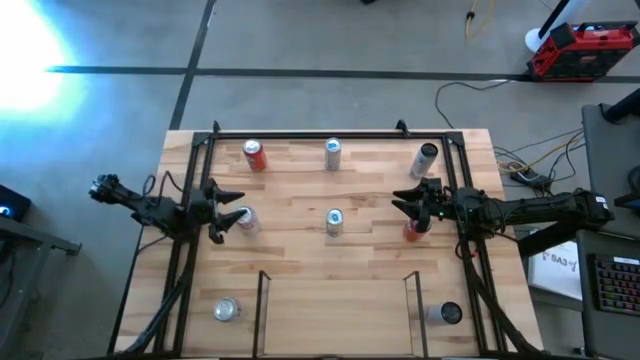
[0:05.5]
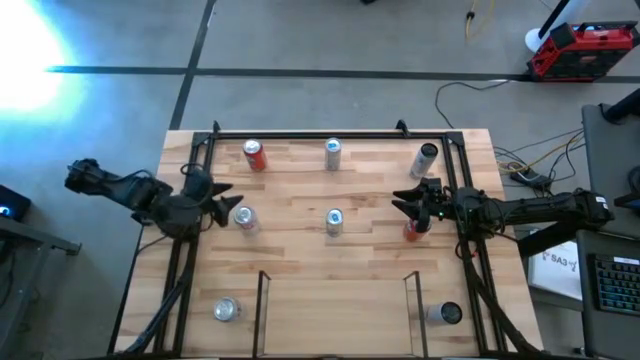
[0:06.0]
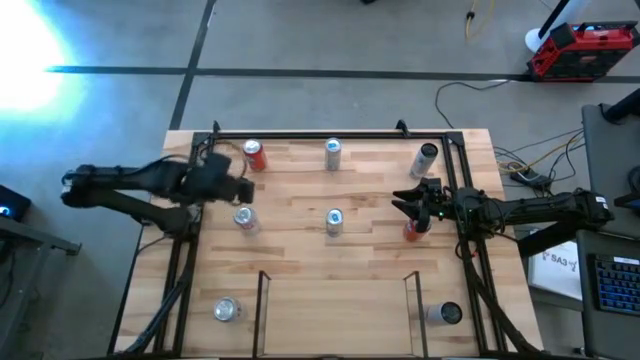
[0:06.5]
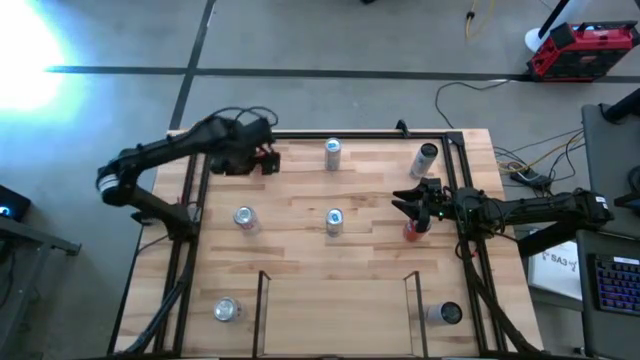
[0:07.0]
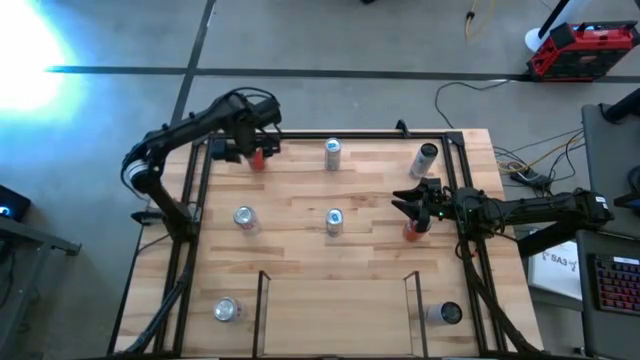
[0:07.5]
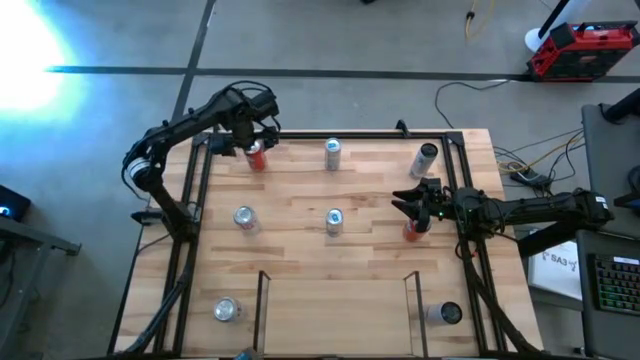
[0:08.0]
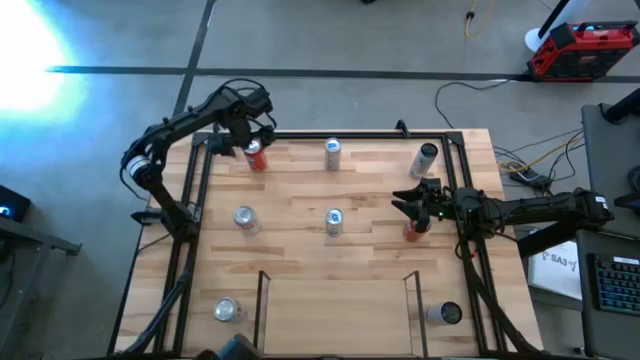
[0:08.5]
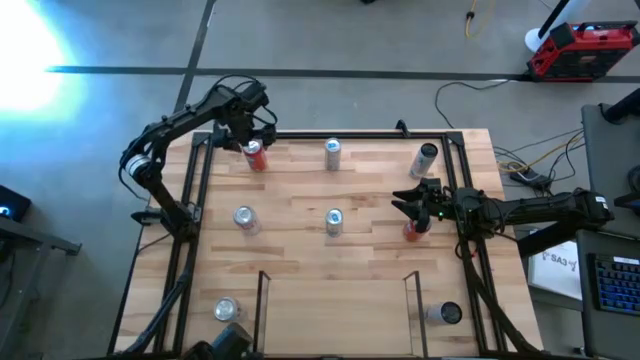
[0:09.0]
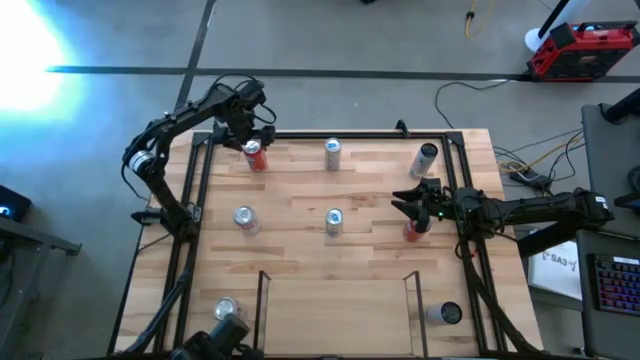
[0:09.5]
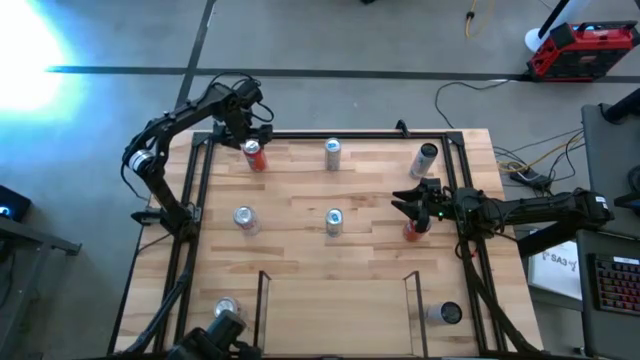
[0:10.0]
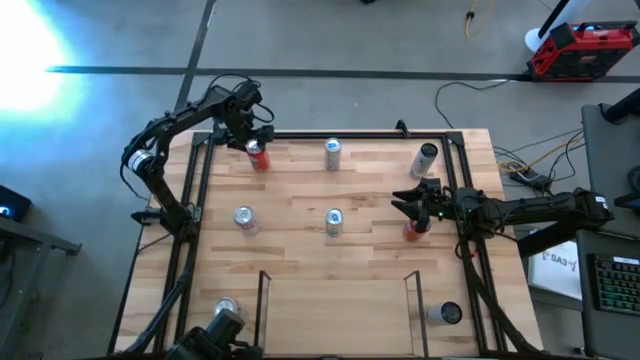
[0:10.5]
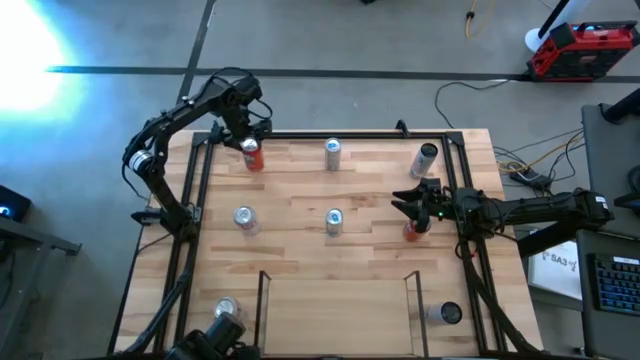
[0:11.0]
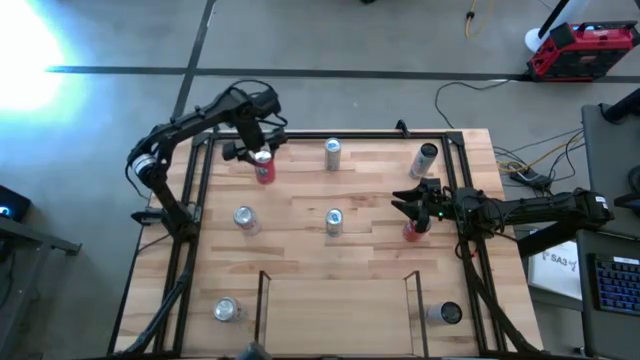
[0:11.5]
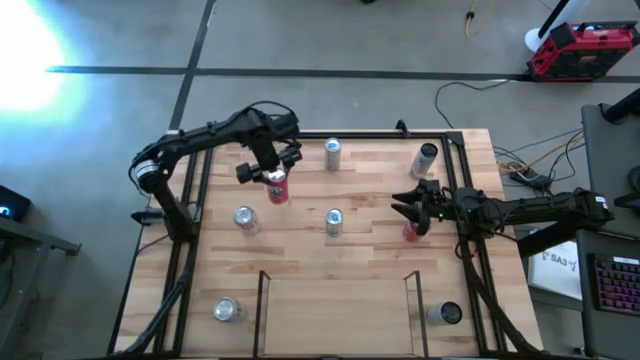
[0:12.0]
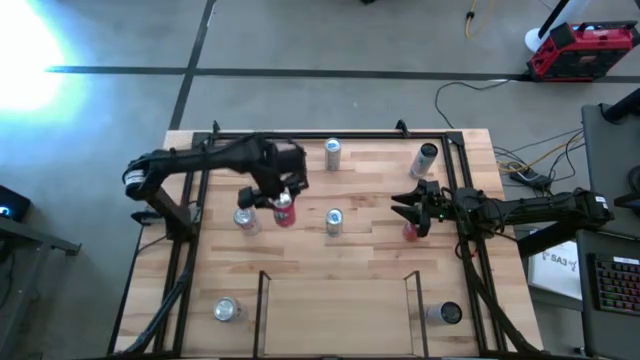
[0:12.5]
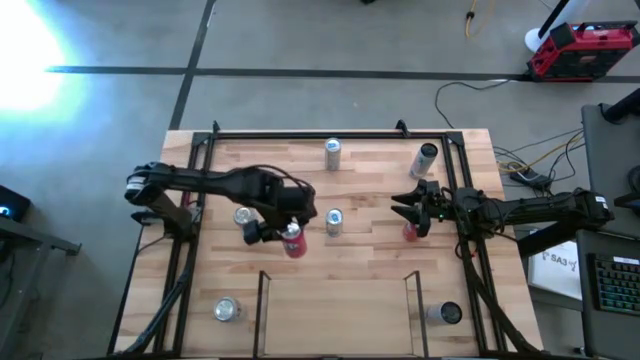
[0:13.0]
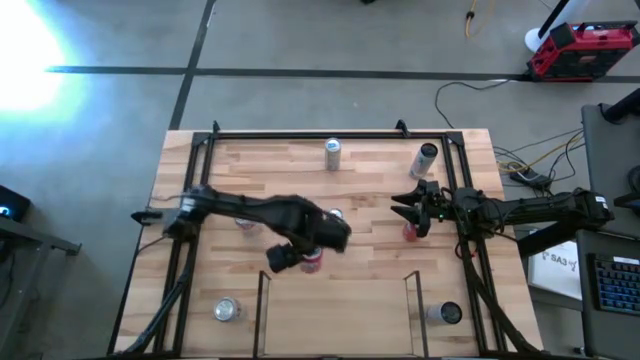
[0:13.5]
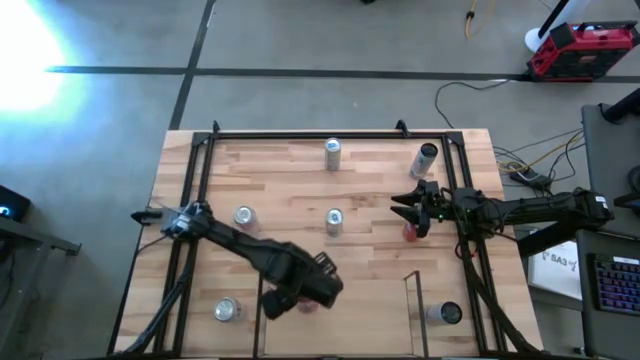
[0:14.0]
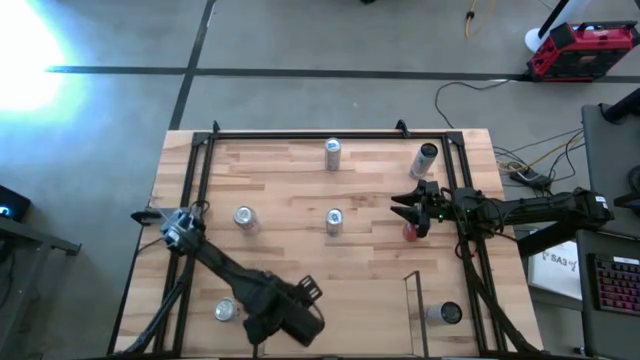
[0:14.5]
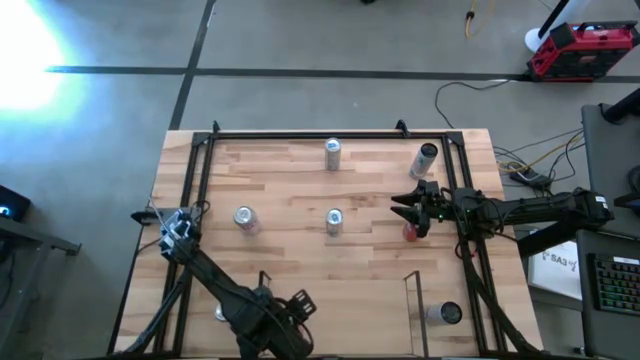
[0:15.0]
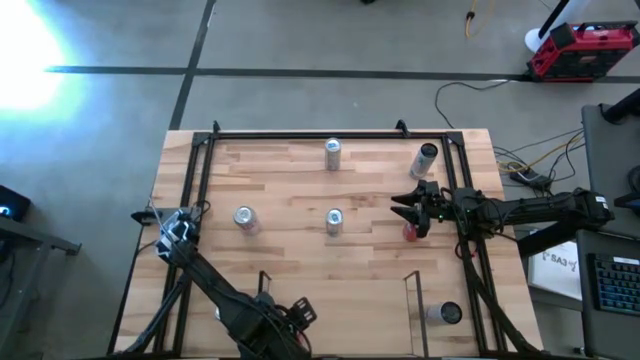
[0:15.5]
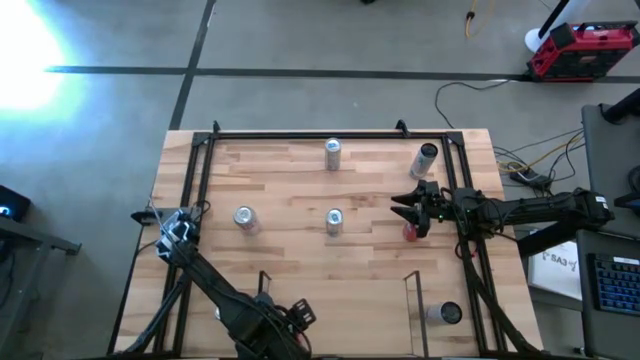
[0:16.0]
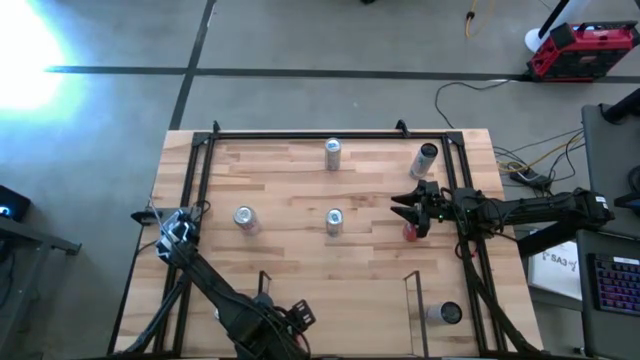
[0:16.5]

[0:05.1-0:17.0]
Task: Place canned beverage on shelf
Put the left red soda can on the shelf

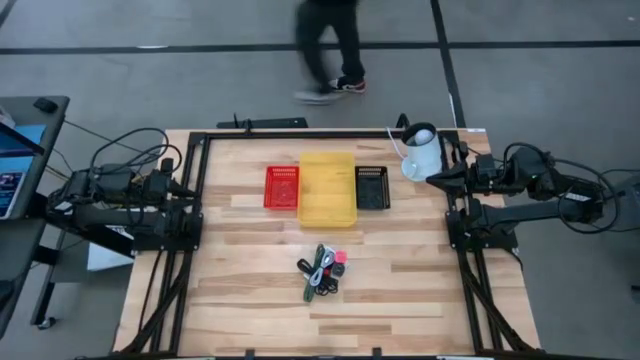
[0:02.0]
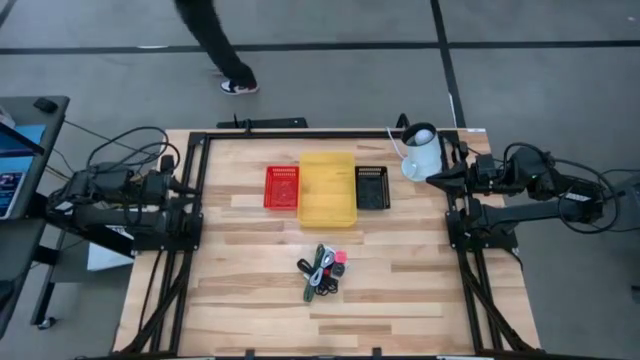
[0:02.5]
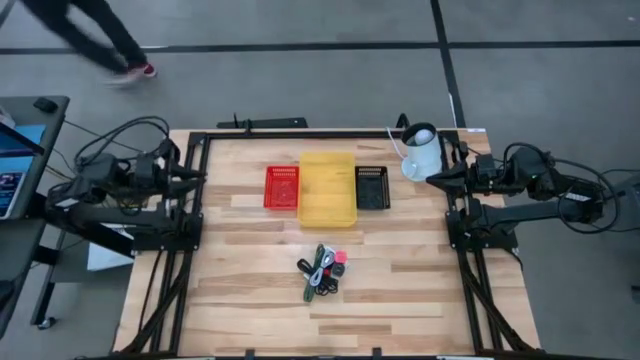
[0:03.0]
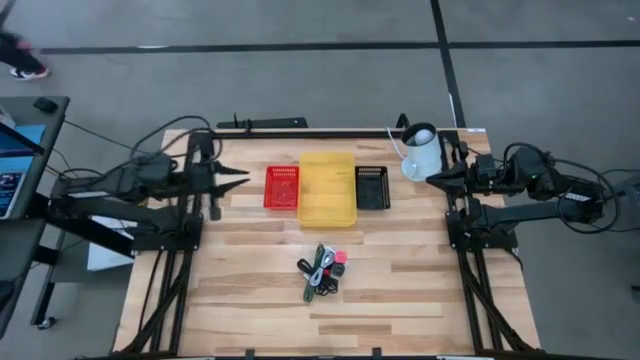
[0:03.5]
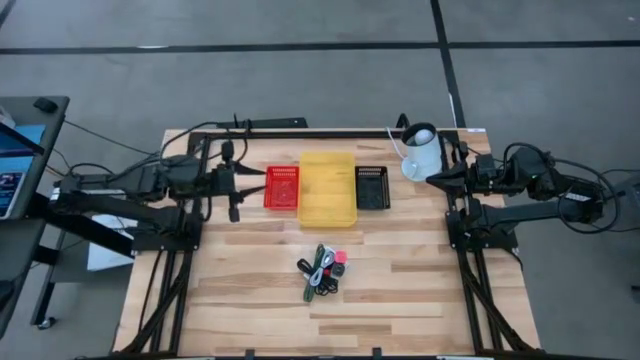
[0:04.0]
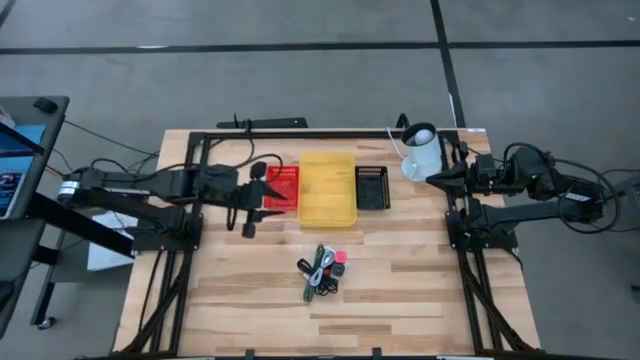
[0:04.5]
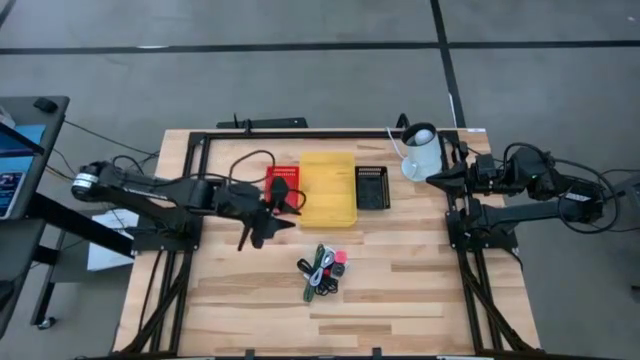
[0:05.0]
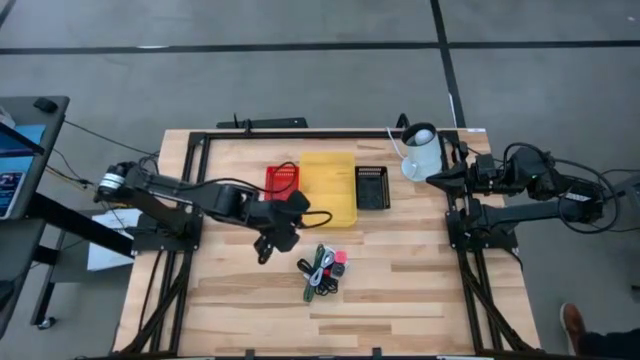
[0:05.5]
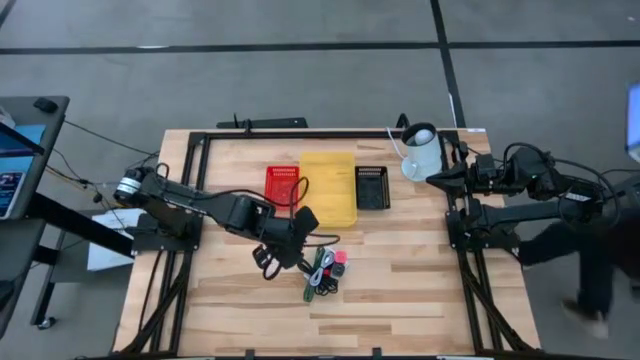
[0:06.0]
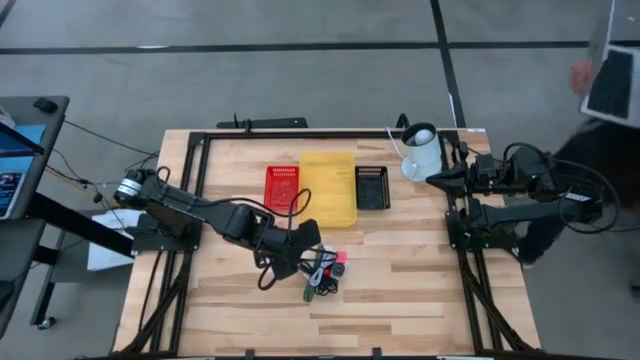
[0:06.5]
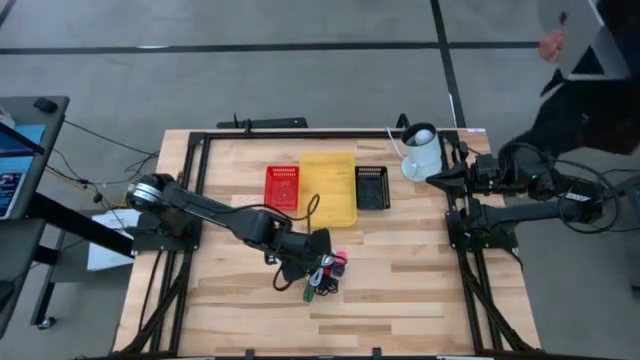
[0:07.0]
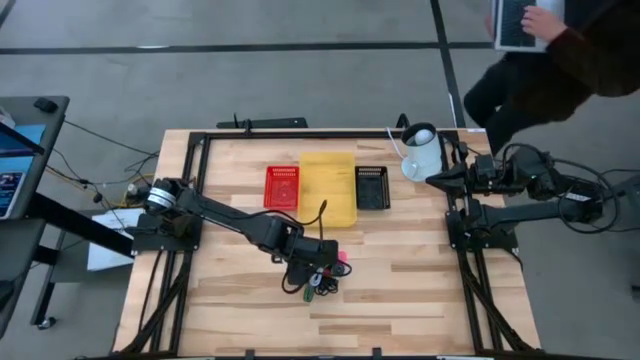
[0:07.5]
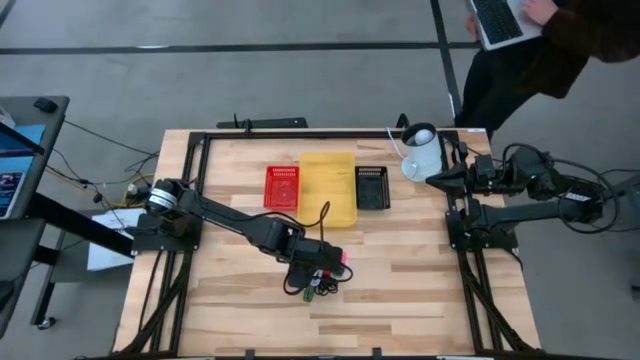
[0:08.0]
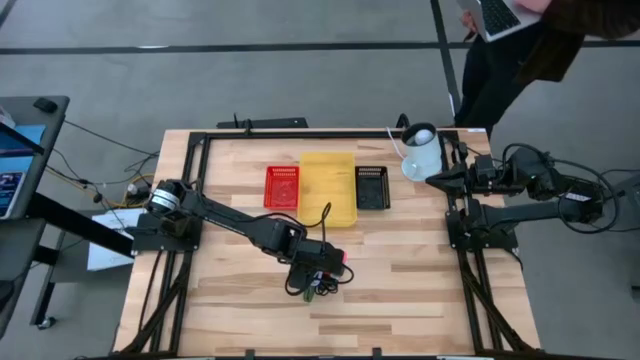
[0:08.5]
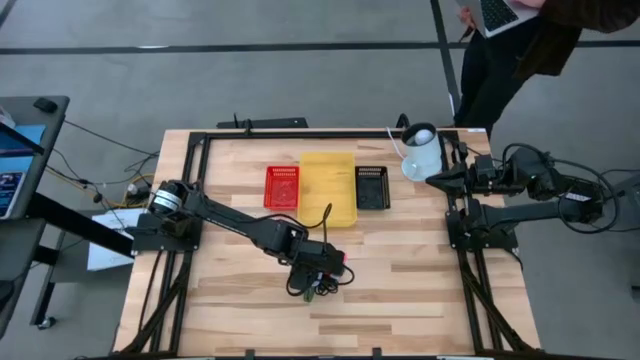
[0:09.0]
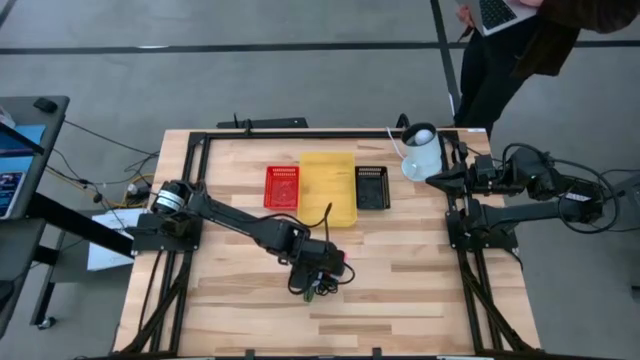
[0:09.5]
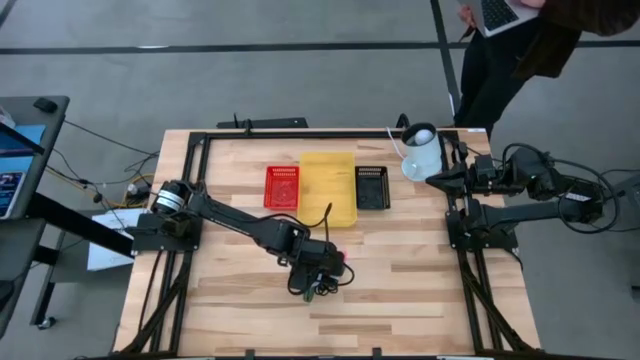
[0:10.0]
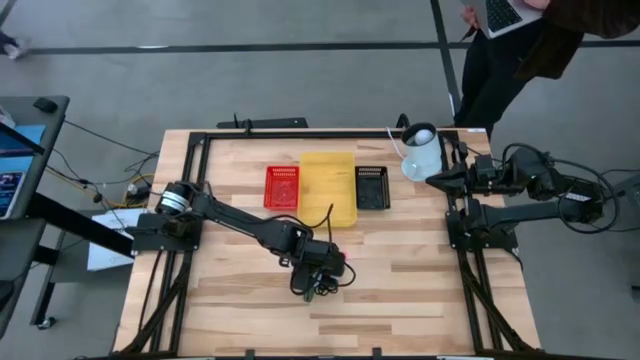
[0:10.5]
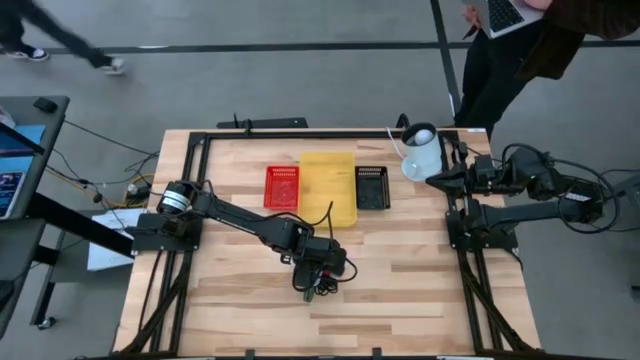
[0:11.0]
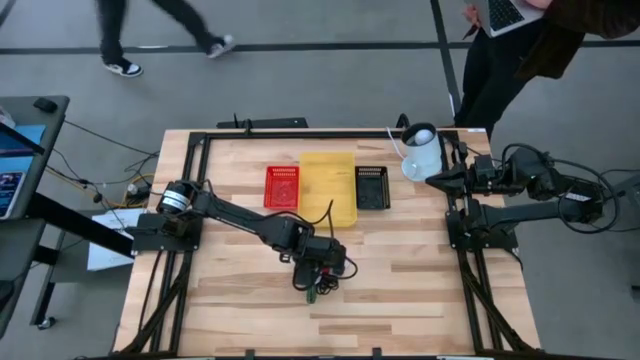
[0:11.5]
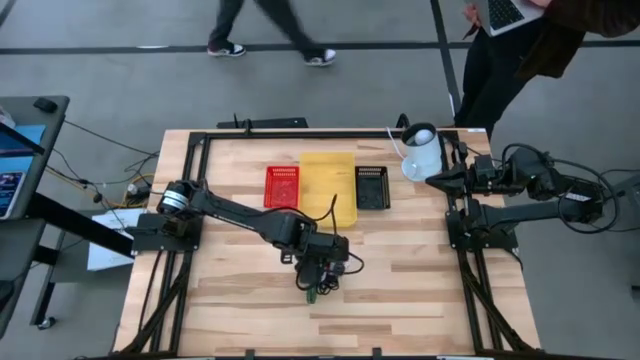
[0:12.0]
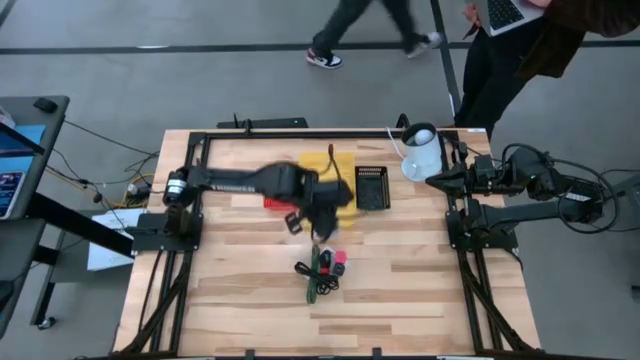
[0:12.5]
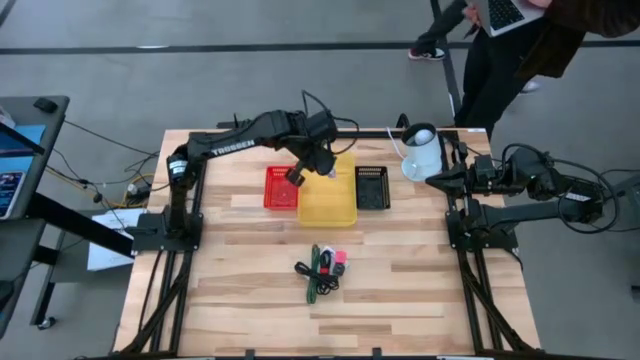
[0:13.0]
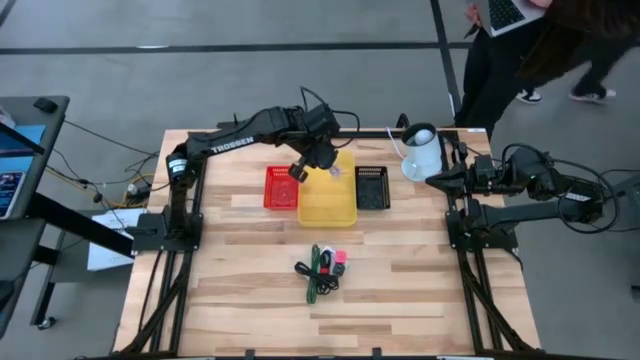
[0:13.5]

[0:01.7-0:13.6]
Task: Pick and place items into bin
Put the gray charger cable in the yellow bin
